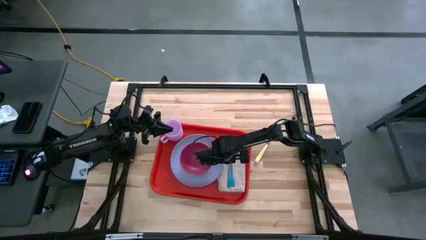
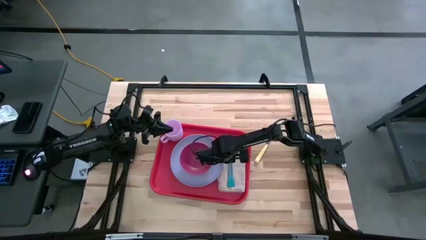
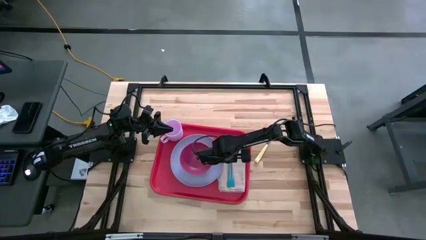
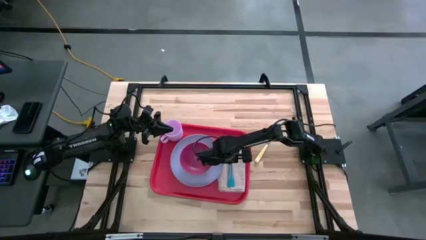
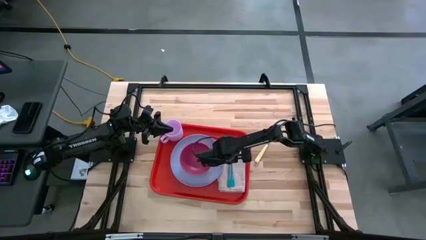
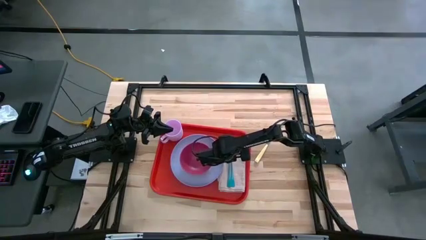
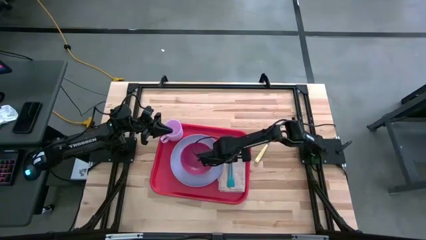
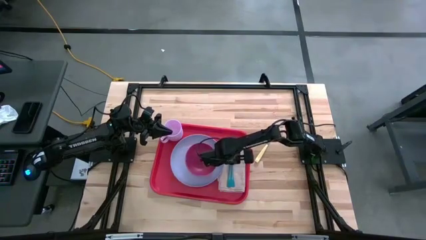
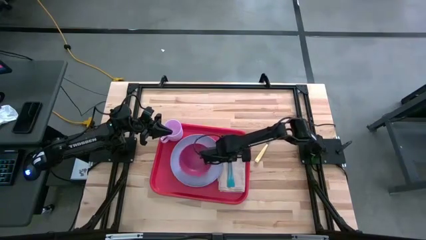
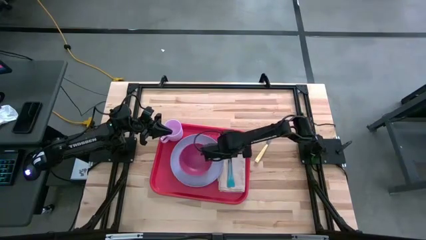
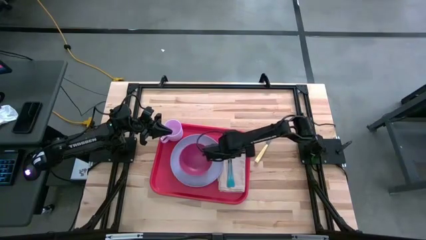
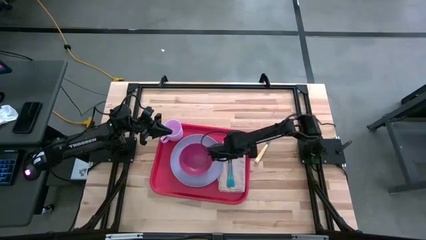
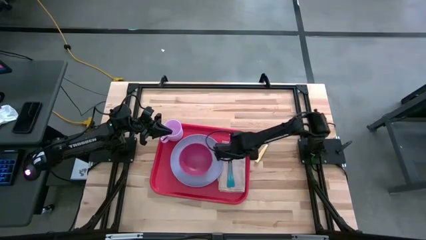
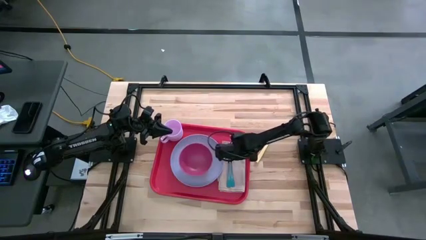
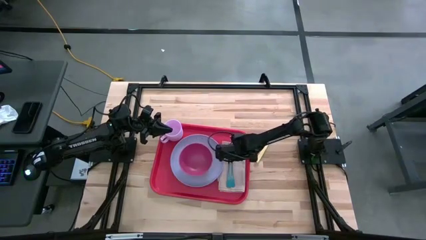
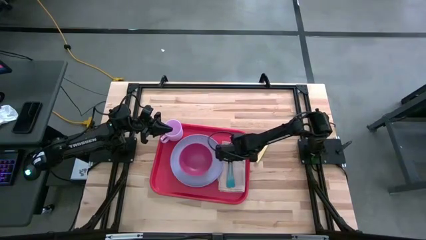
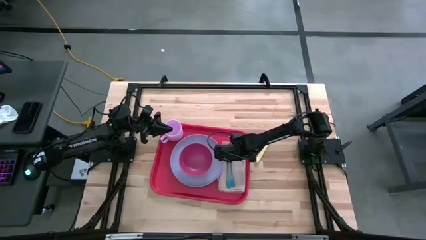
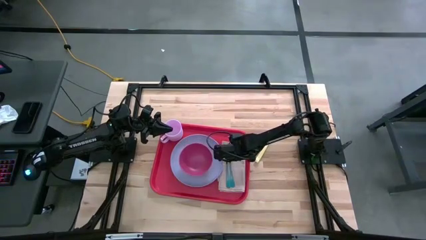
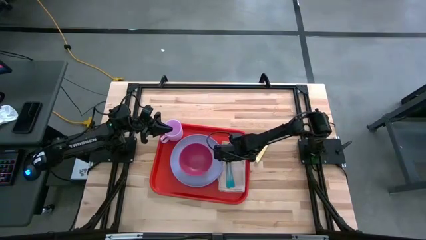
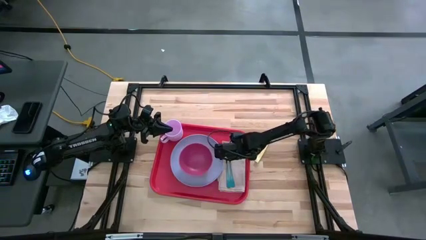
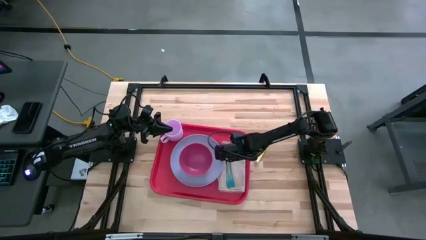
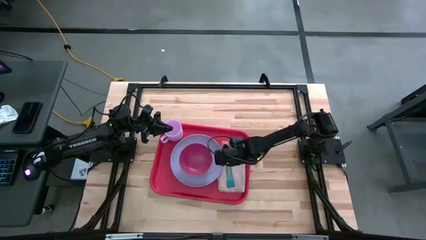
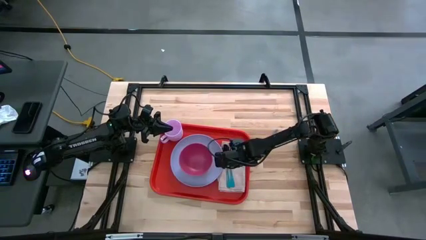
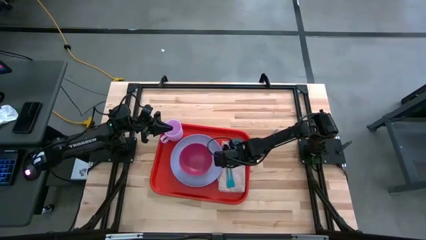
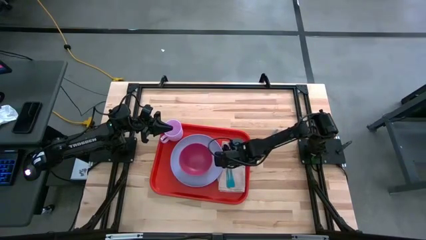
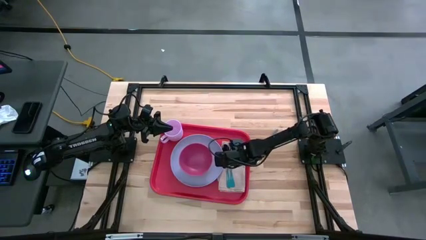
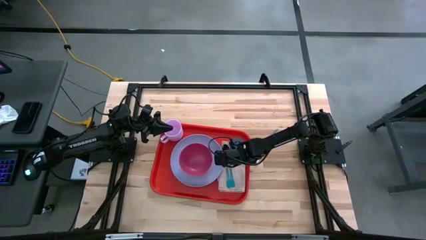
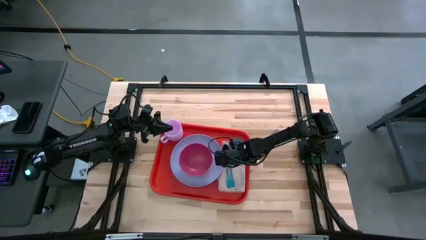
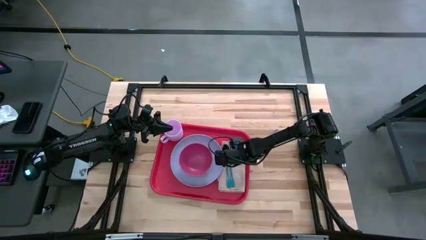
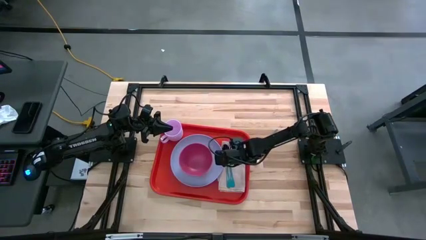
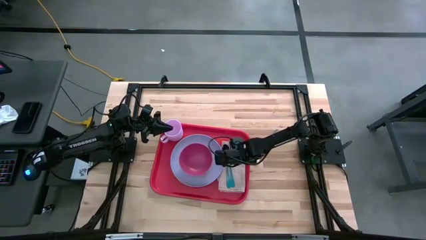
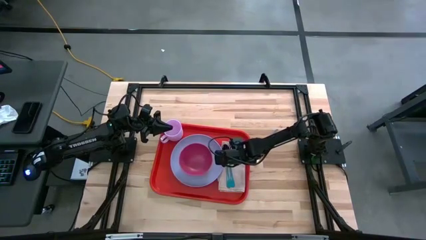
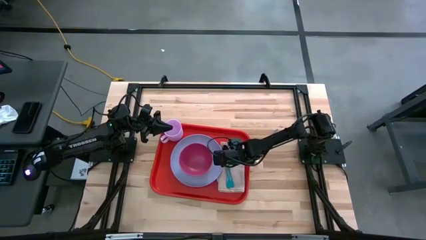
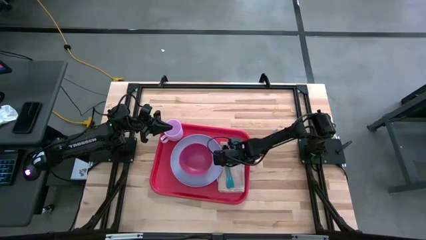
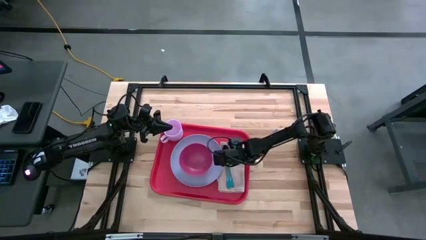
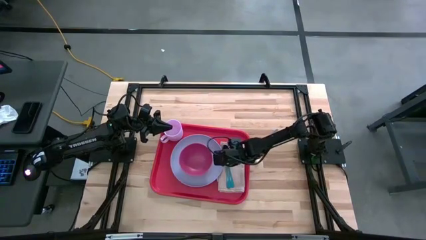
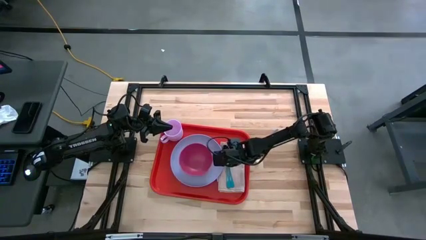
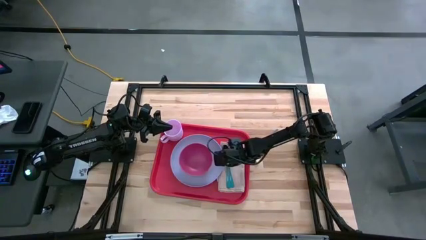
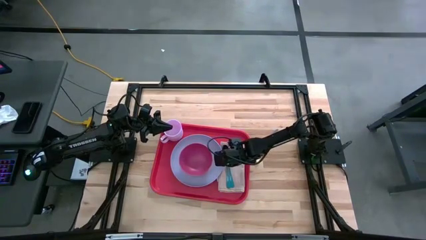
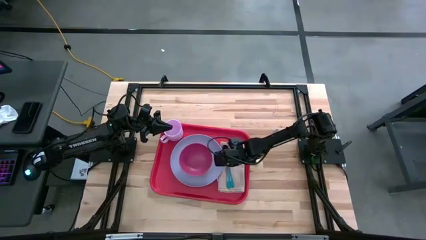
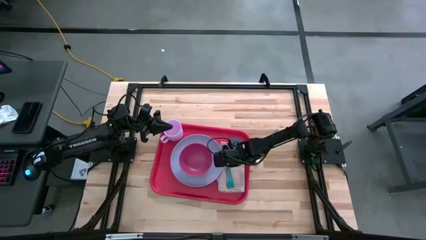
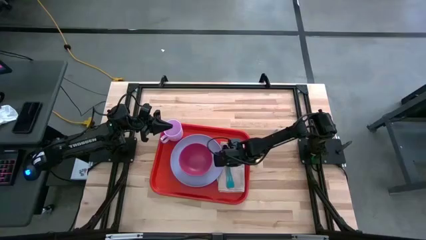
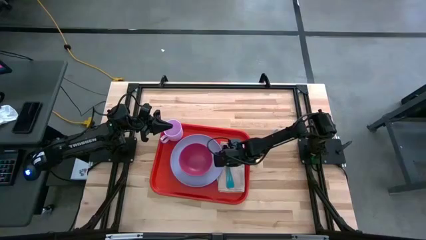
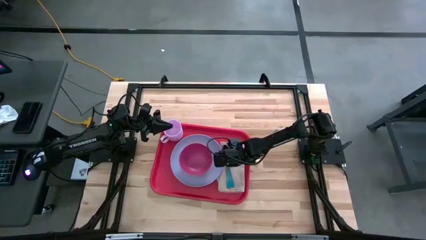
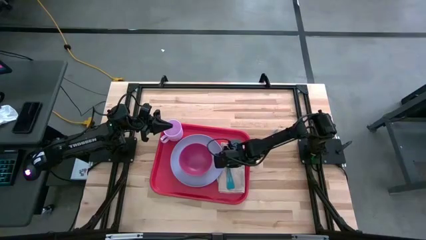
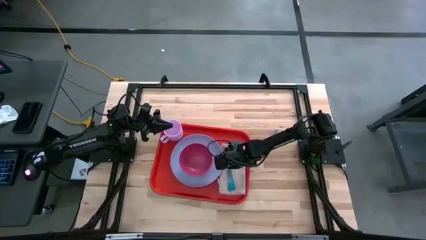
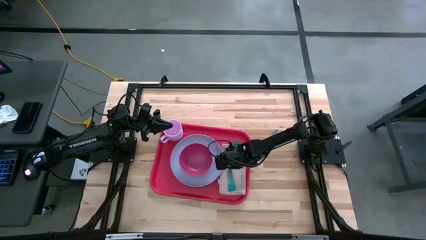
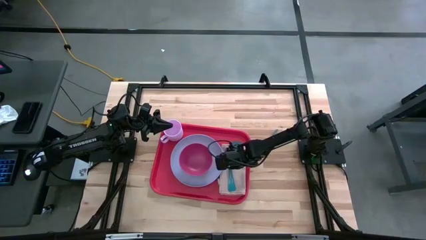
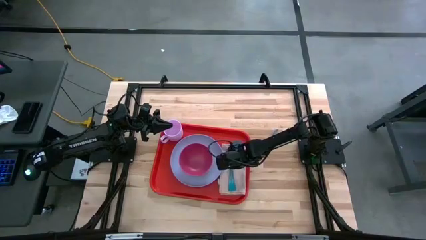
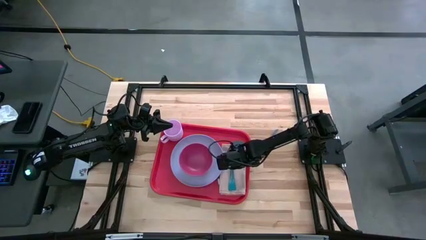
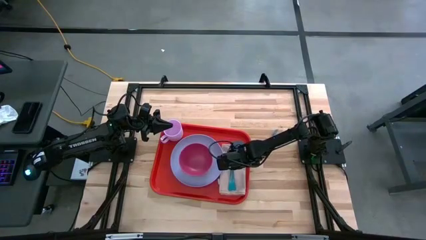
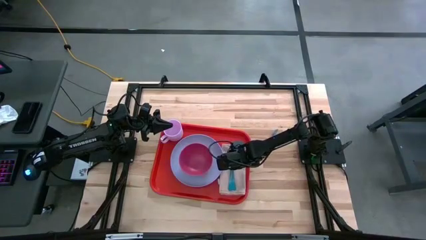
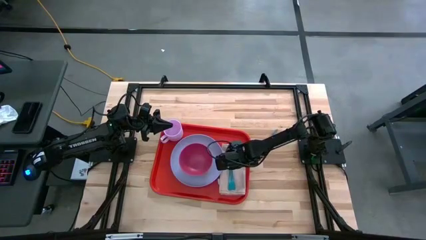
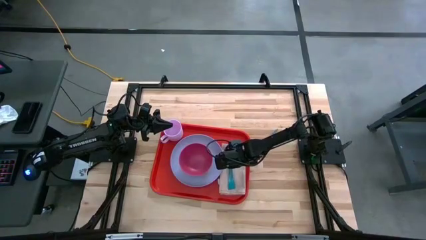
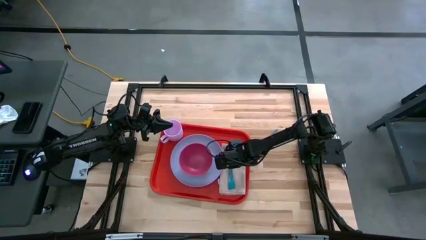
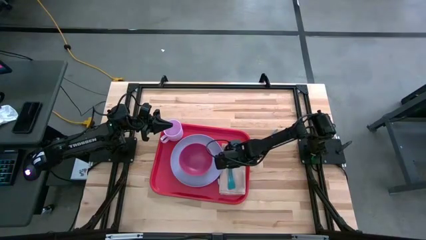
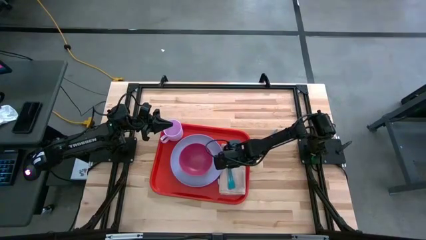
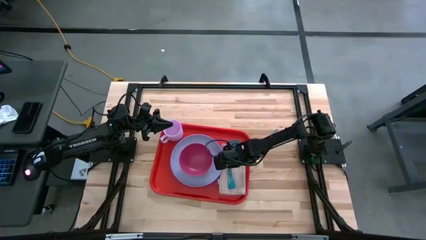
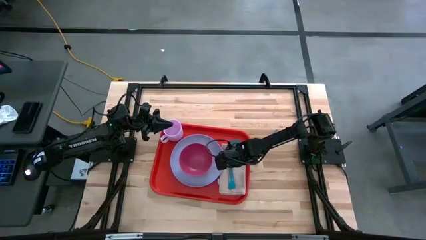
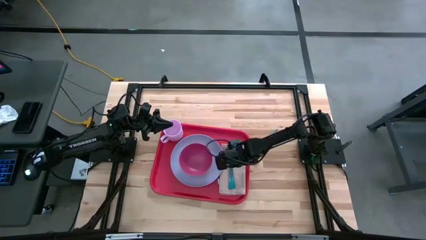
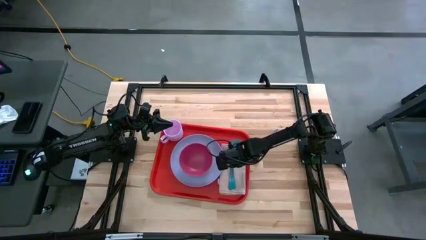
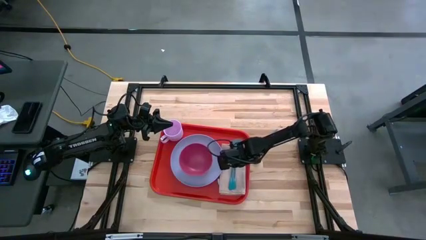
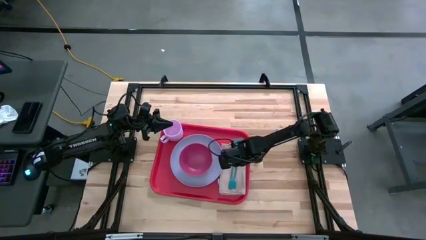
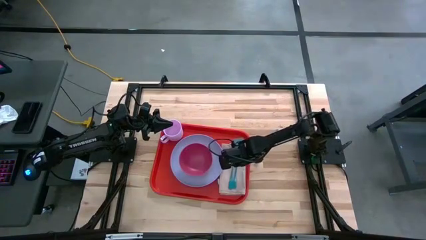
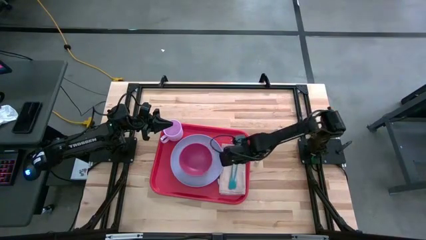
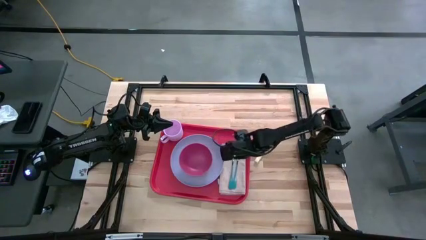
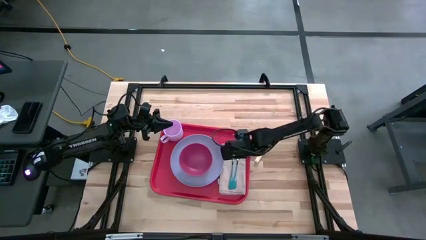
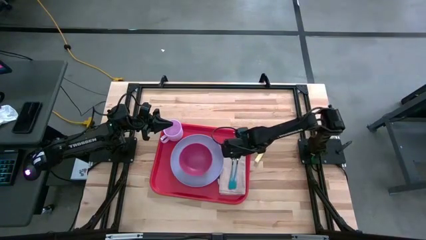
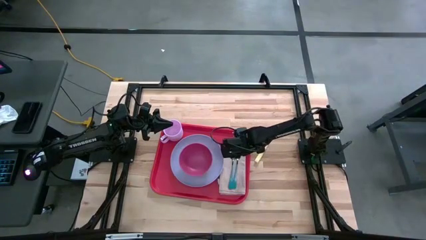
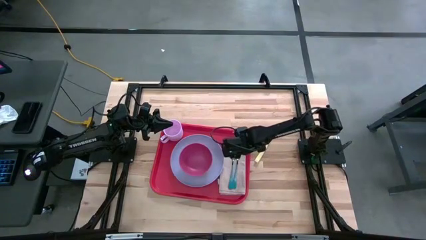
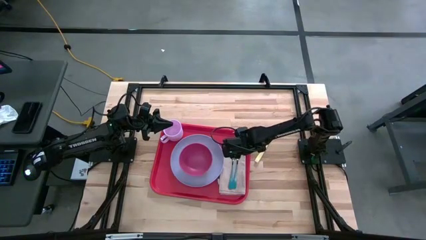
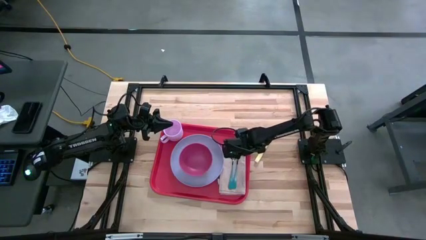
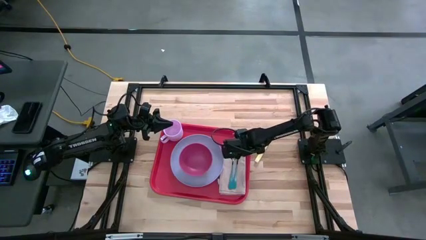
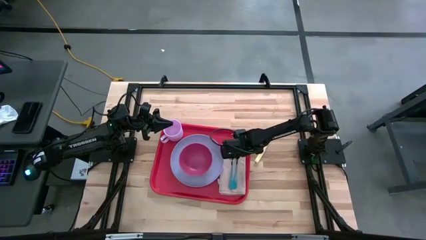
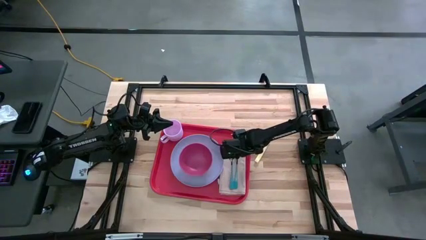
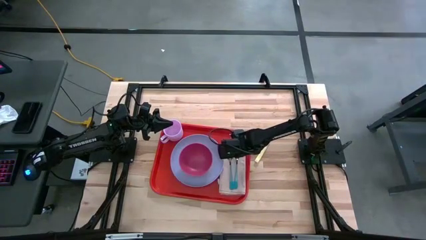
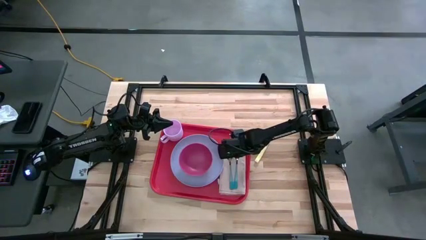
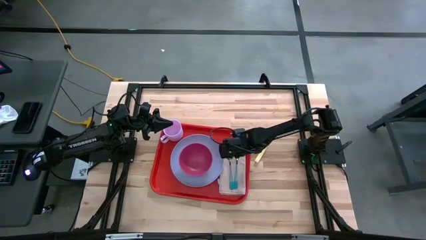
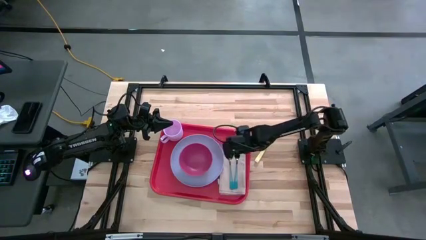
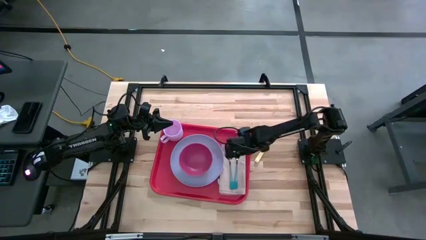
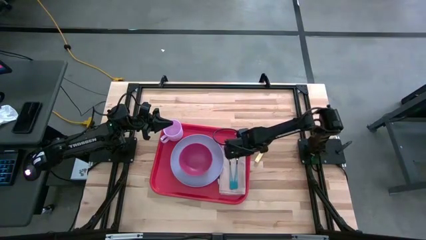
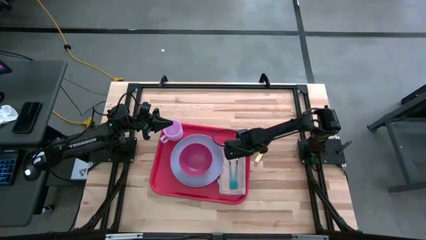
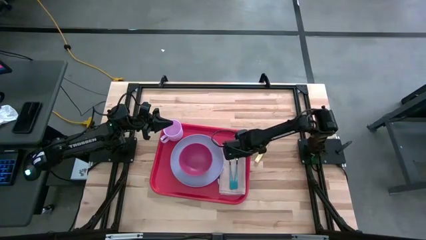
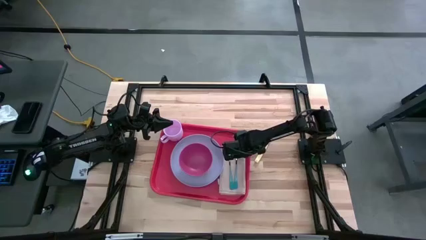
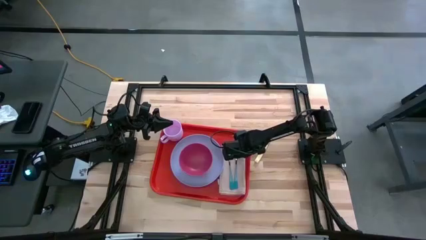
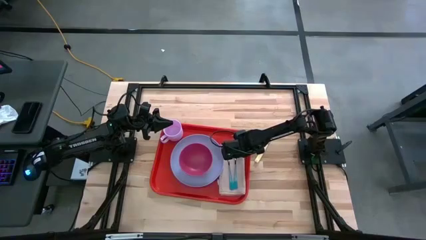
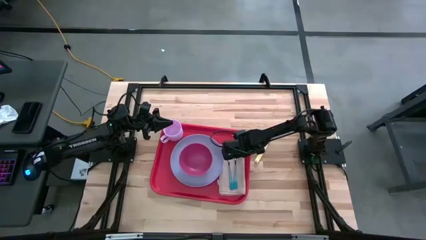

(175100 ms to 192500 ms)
Task: Set up tray
Adjust the utensils on the gray napkin
